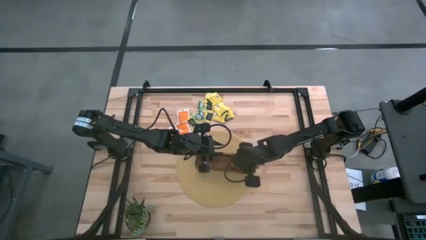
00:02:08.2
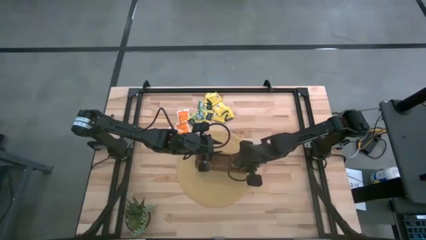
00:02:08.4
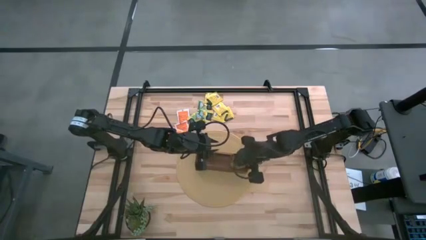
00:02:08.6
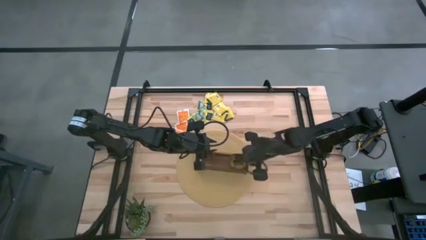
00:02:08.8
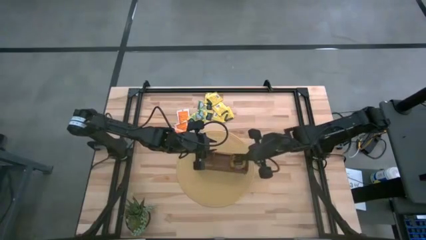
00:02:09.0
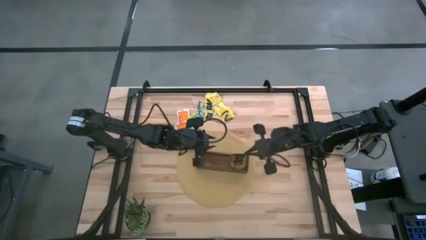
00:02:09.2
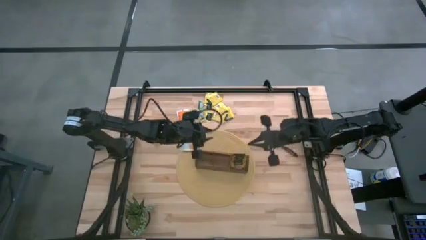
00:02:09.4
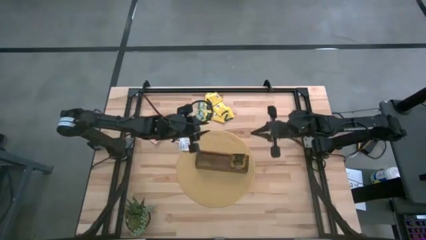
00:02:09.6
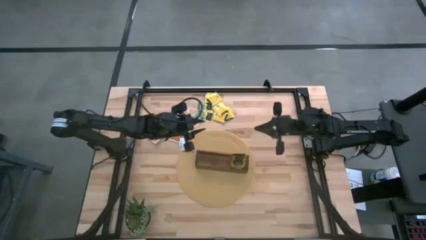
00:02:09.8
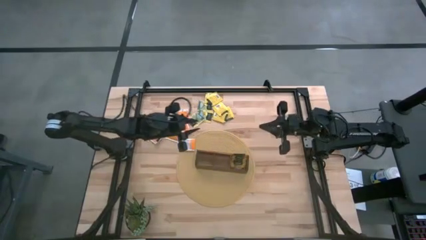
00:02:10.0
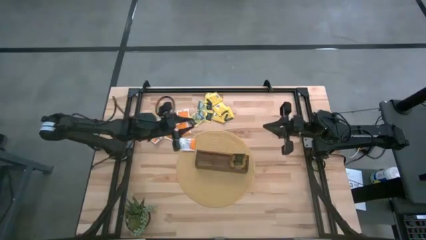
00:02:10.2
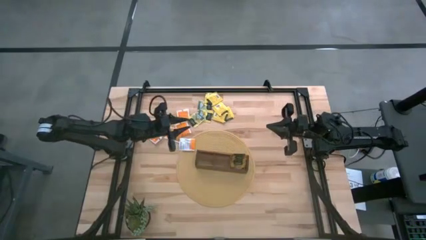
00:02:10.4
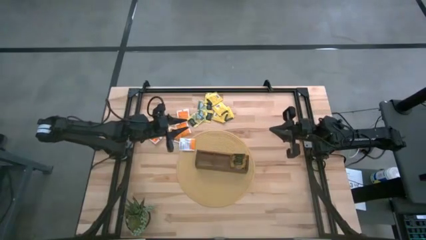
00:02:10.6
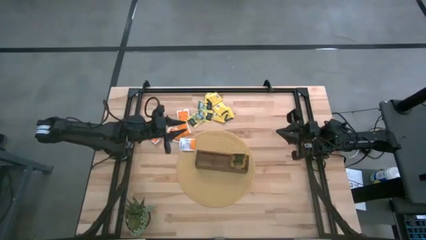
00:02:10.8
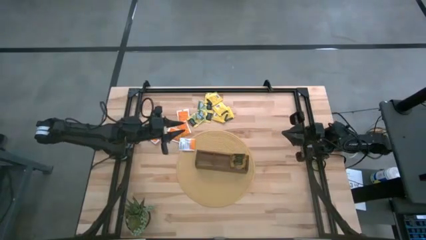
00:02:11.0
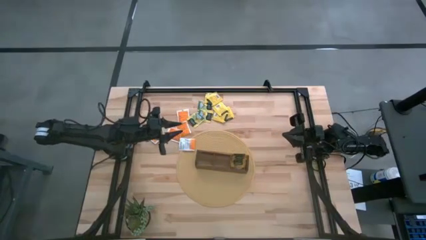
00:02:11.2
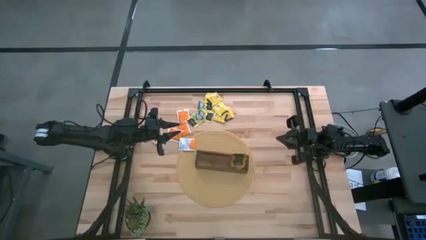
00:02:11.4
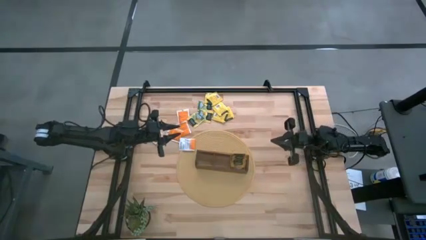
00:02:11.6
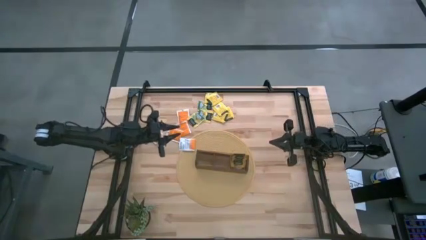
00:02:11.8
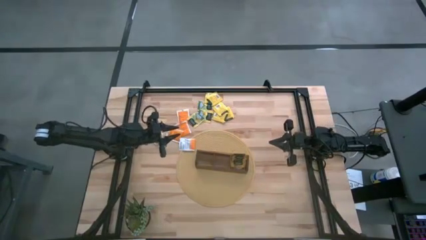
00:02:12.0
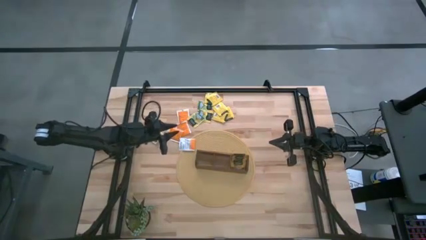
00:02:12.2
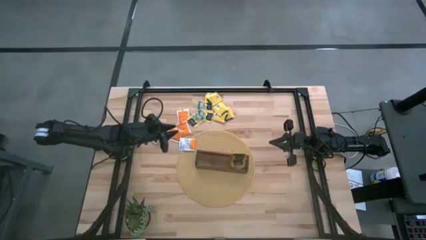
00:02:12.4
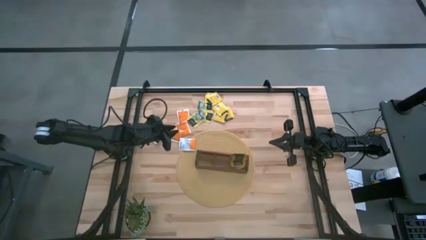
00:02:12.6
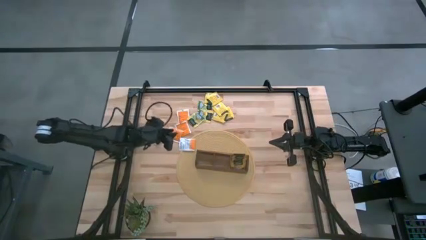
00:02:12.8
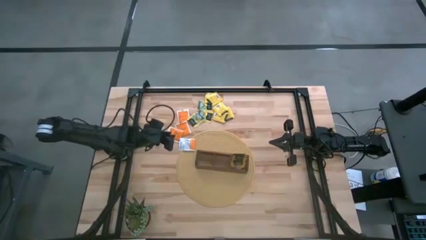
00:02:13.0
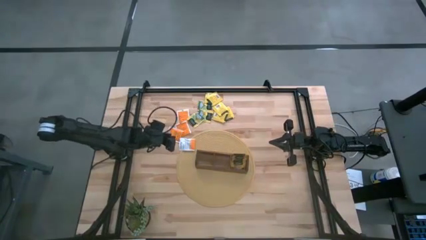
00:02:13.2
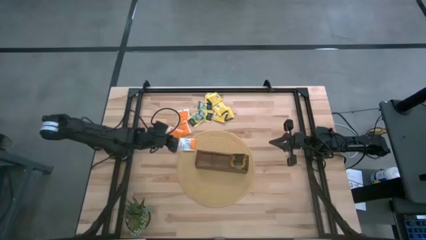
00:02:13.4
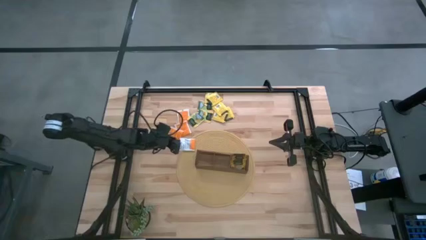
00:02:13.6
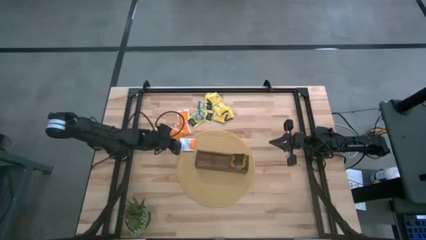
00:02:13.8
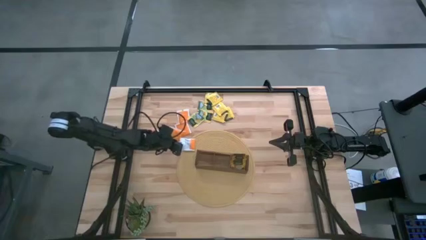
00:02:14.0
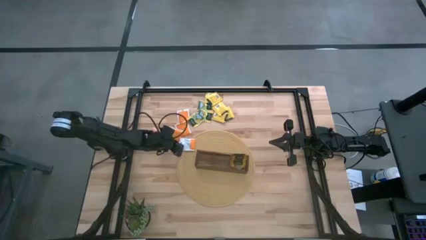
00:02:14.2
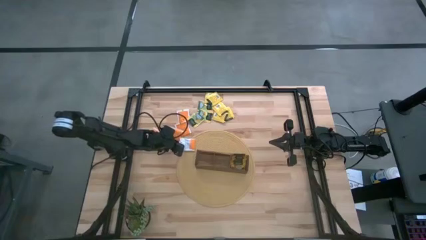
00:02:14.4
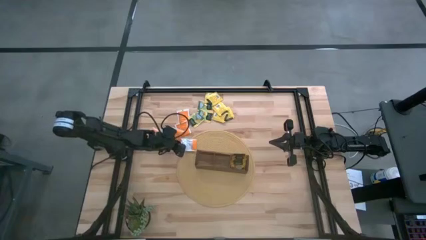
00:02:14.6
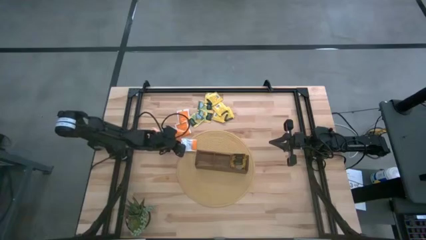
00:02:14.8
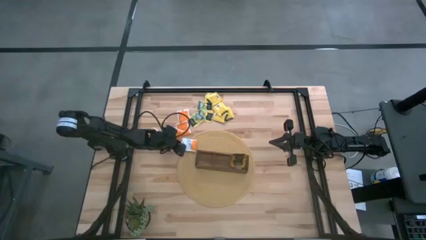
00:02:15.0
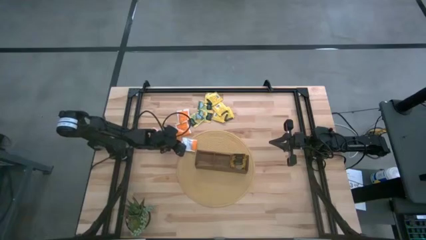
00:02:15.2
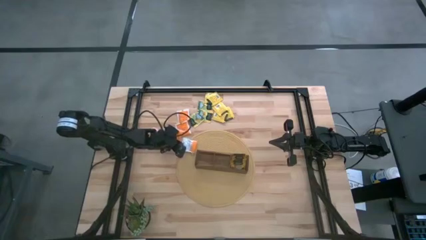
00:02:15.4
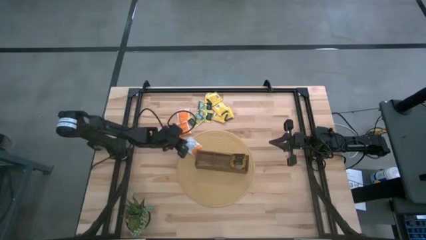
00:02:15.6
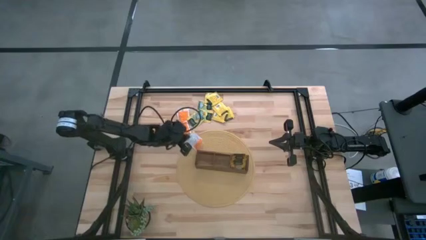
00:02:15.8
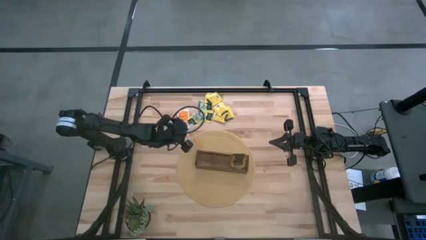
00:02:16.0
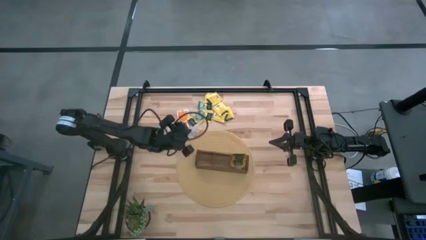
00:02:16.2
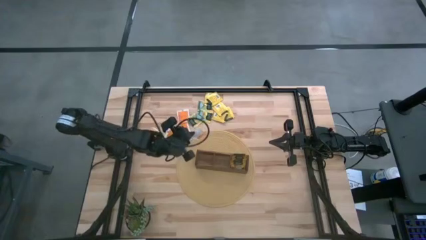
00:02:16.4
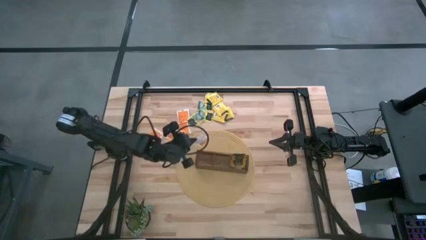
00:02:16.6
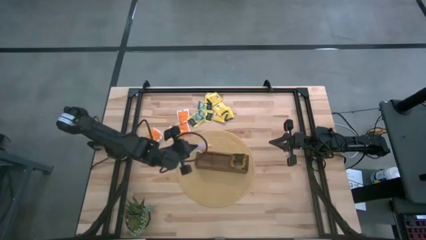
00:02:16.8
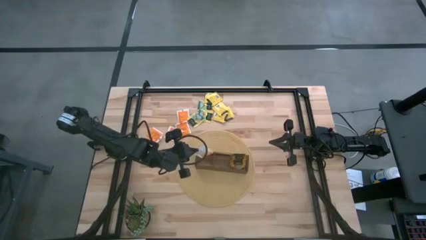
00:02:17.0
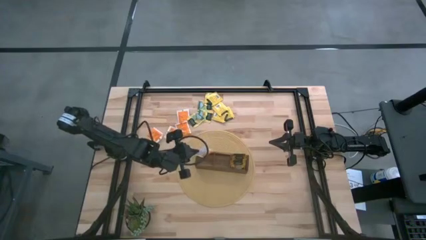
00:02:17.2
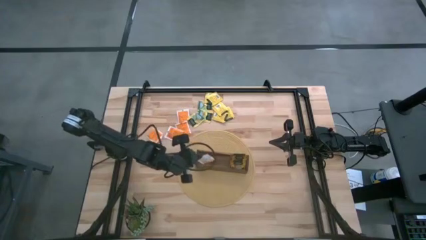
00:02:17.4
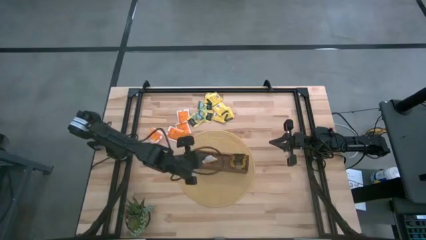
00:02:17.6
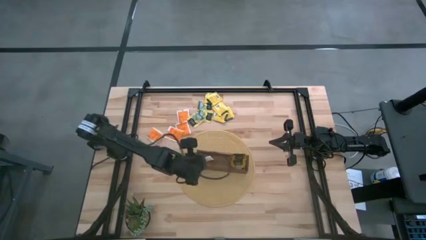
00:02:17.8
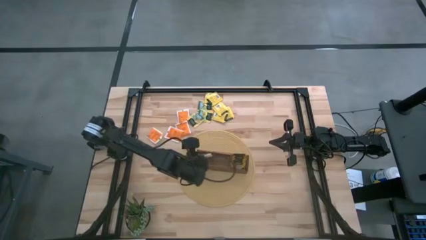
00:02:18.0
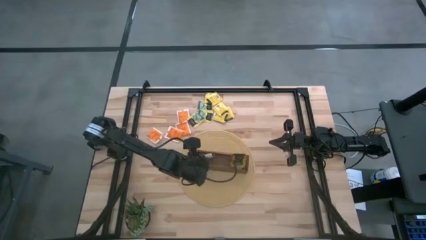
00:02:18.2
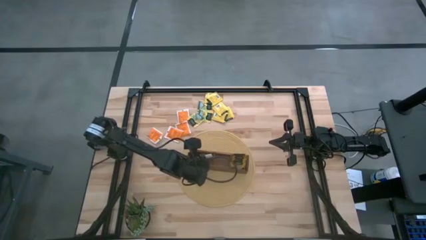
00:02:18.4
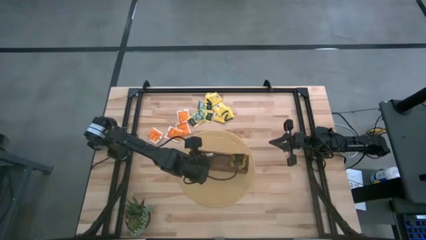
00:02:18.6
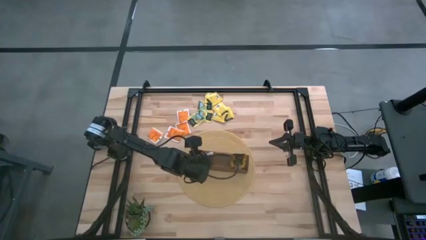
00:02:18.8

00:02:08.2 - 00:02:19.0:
Task: Pick & Place Tea
Put the white and orange tea bag into the wooden organizer

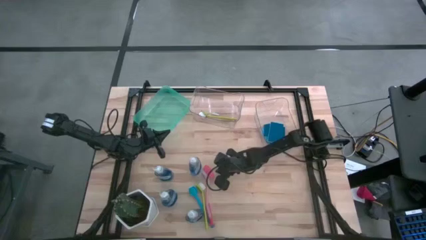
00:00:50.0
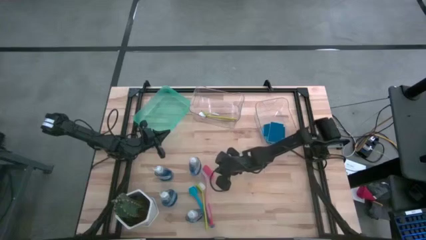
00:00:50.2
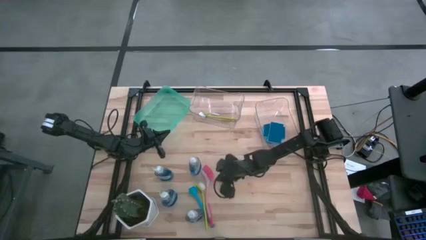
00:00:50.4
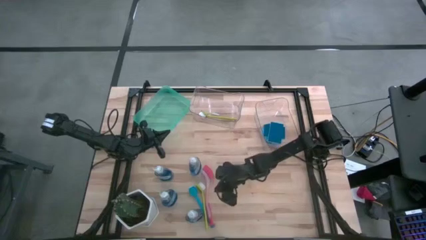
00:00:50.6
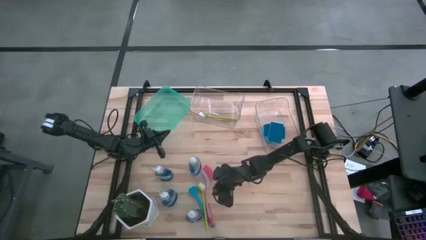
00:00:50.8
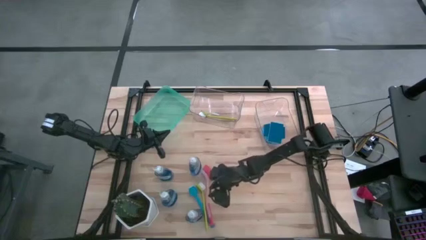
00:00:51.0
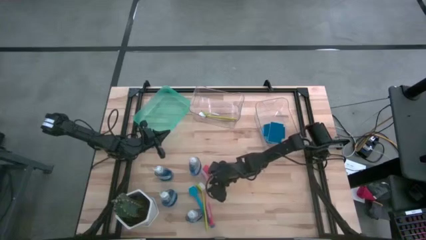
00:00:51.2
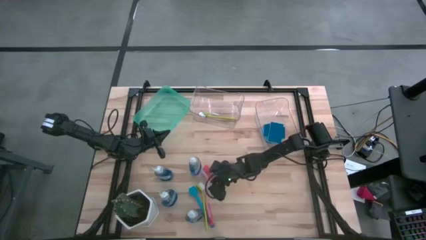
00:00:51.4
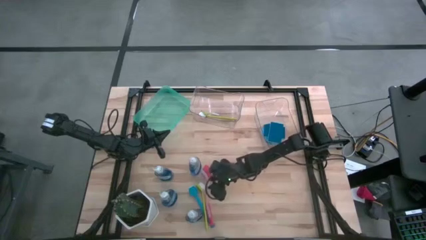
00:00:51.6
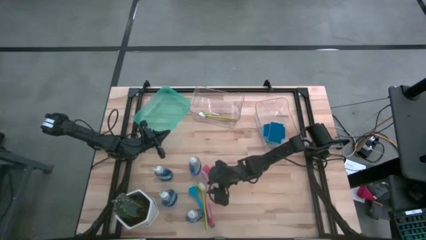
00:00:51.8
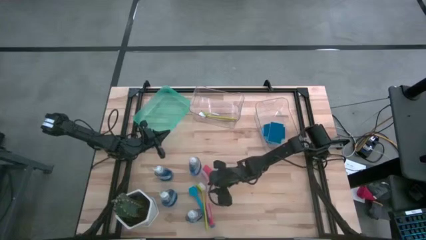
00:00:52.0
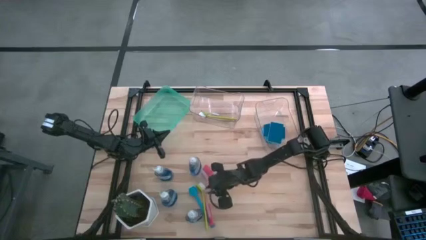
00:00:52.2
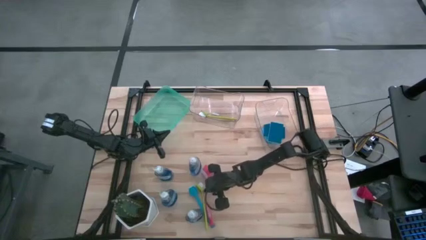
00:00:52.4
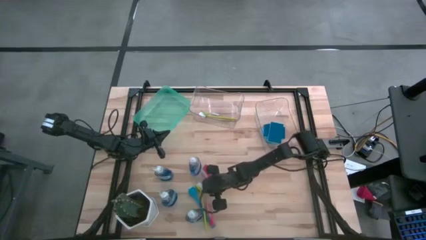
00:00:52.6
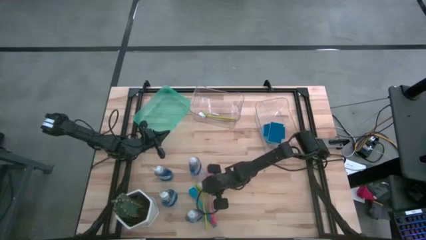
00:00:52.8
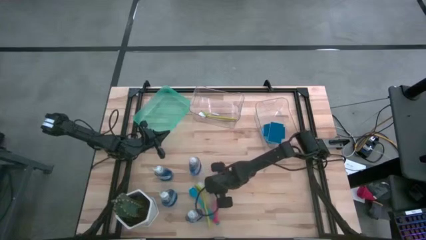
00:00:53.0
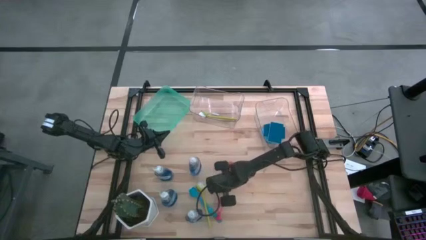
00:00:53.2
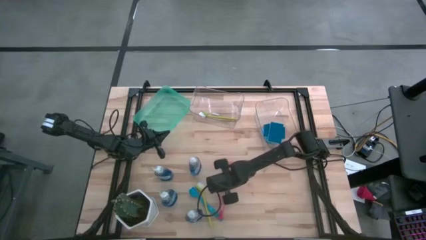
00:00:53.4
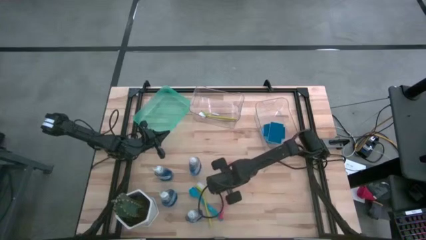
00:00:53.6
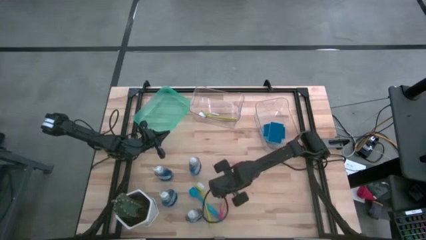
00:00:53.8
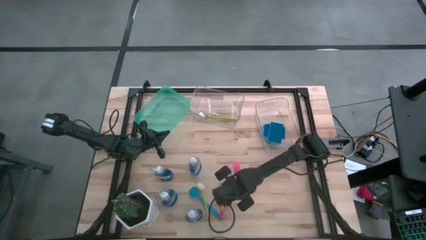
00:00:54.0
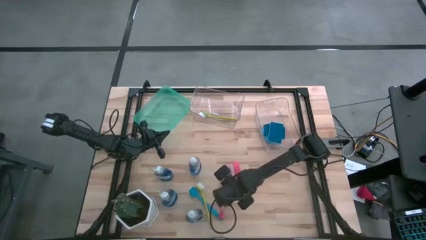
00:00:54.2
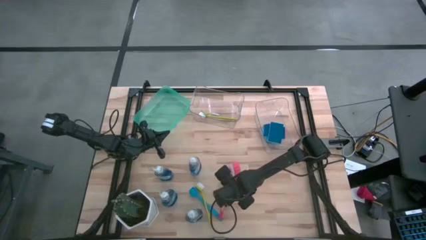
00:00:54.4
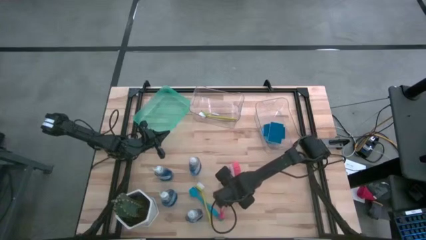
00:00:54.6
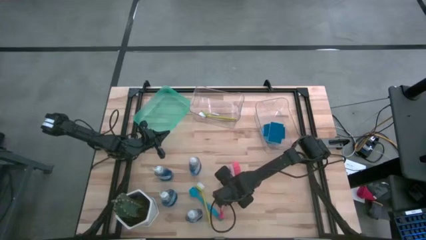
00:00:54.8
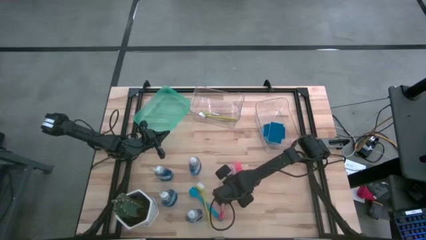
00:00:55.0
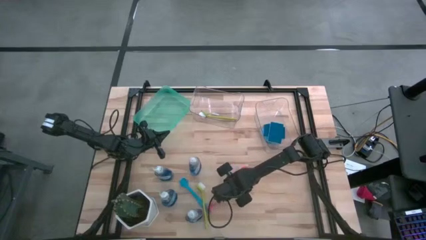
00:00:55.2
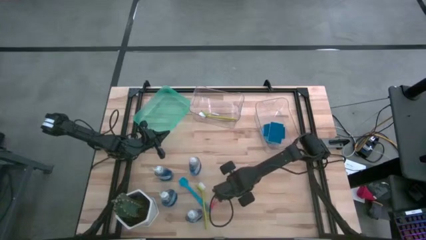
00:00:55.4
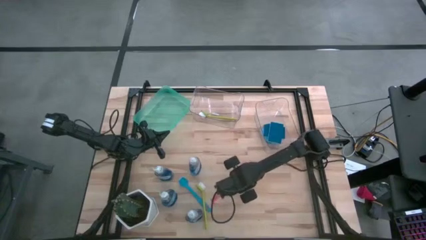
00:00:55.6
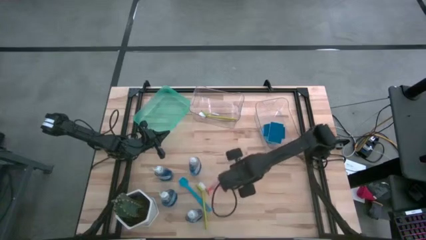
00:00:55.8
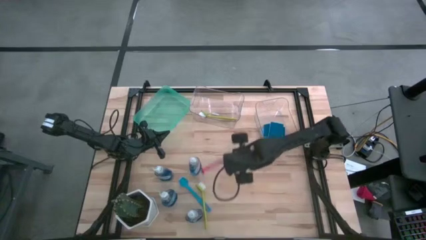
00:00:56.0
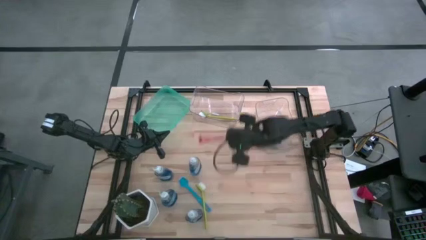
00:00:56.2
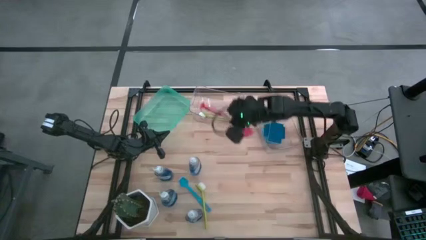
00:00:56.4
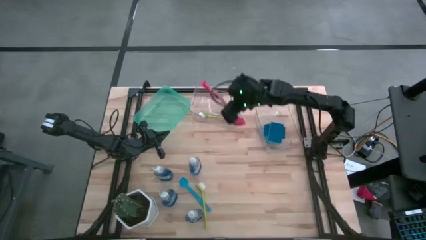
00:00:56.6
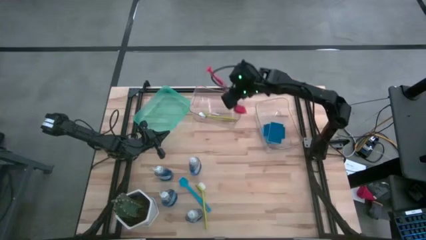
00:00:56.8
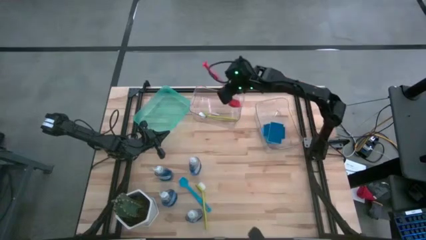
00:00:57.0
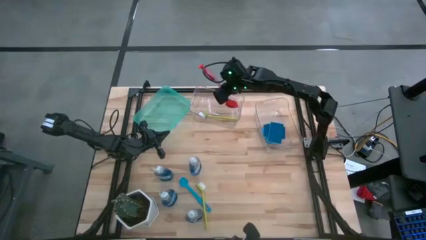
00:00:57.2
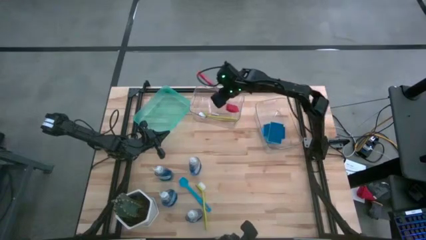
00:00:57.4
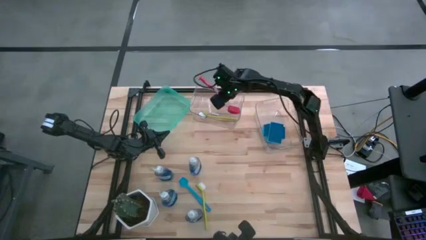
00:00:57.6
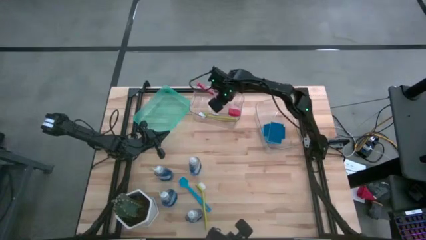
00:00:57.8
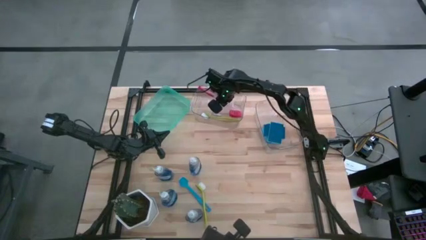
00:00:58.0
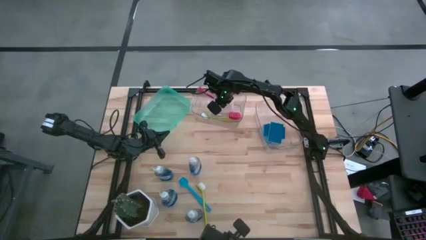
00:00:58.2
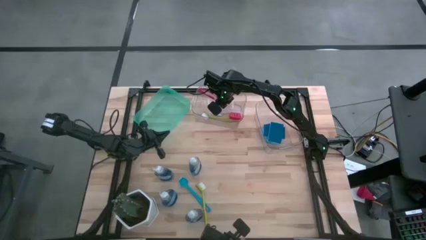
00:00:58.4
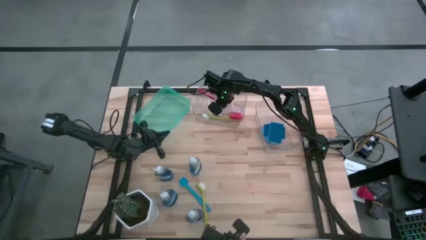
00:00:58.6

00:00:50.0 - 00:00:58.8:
Task: Pick & Place Kitchen Sink Supplies
Put the red dish brush in the left transparent bin
